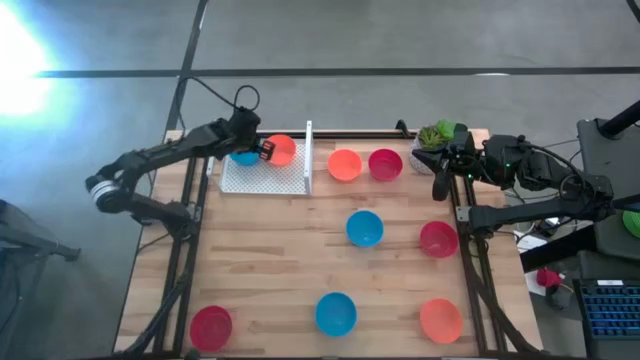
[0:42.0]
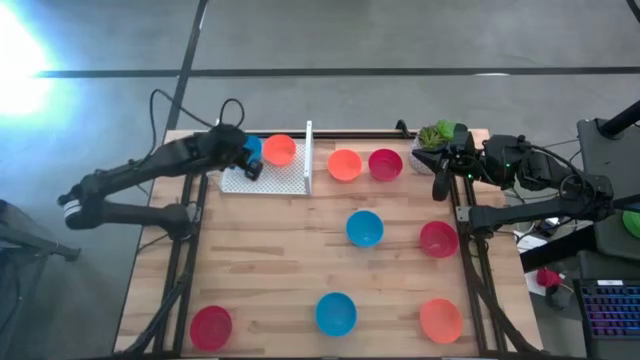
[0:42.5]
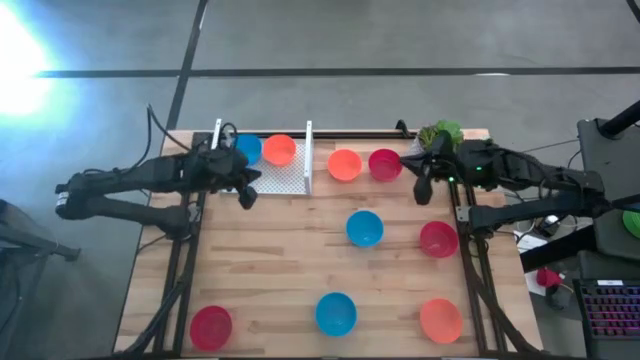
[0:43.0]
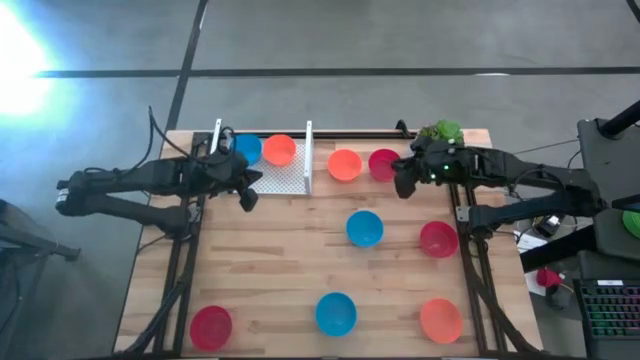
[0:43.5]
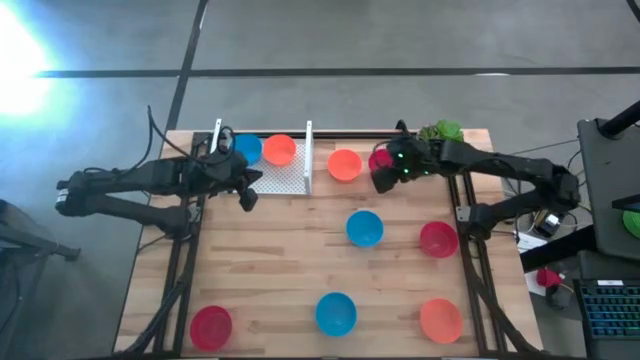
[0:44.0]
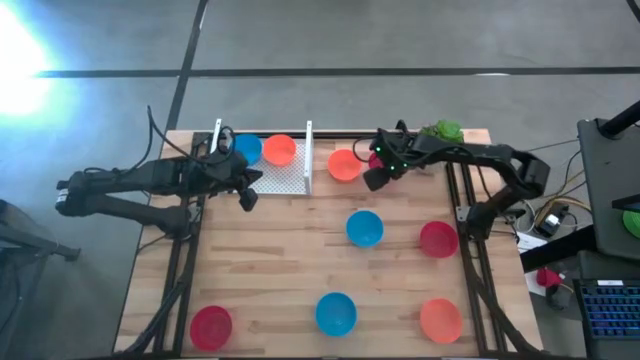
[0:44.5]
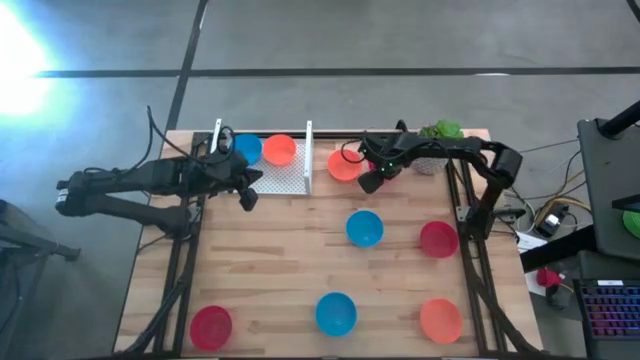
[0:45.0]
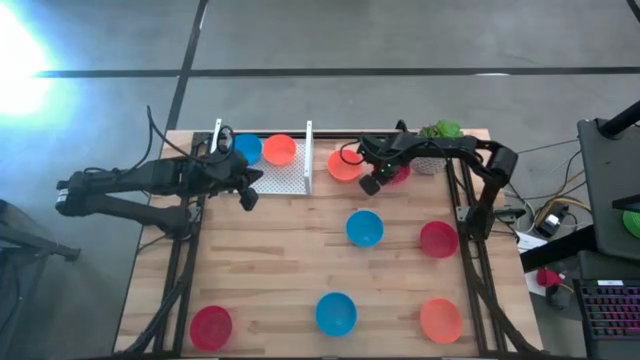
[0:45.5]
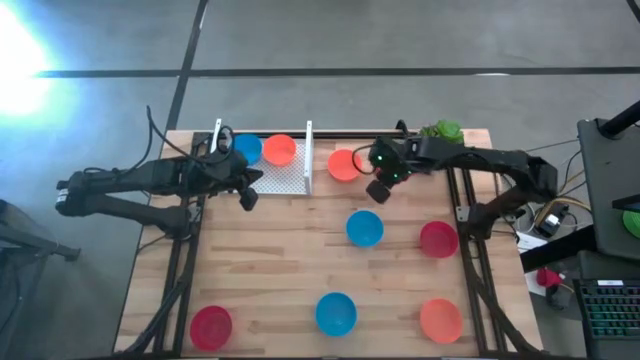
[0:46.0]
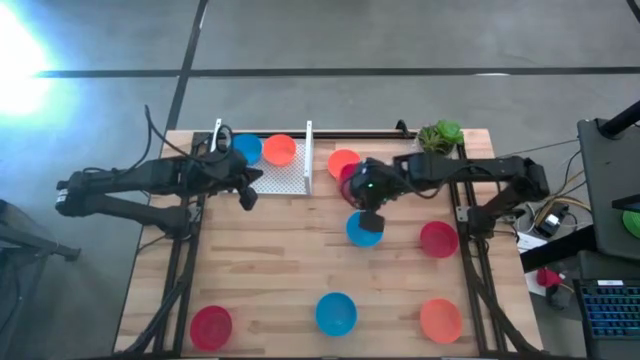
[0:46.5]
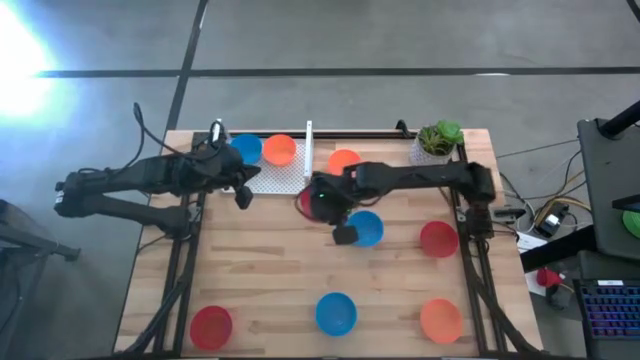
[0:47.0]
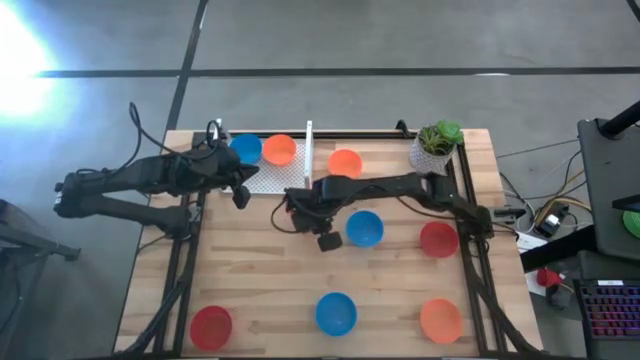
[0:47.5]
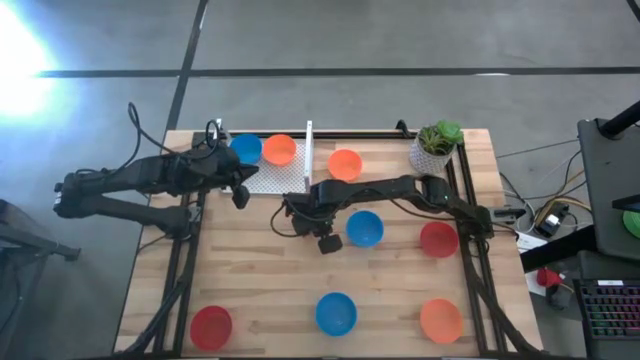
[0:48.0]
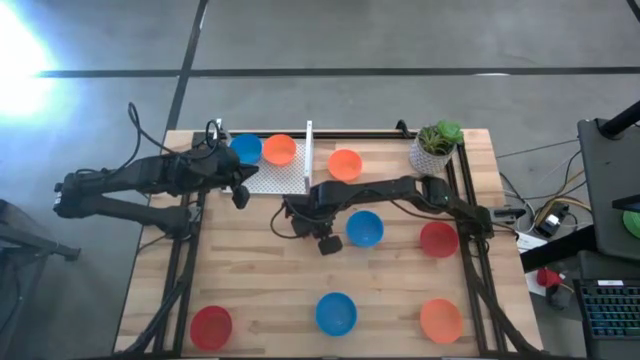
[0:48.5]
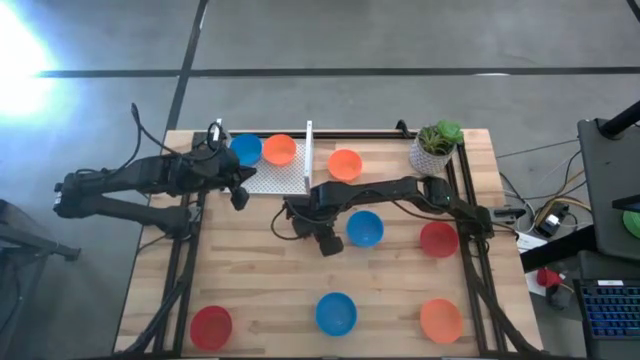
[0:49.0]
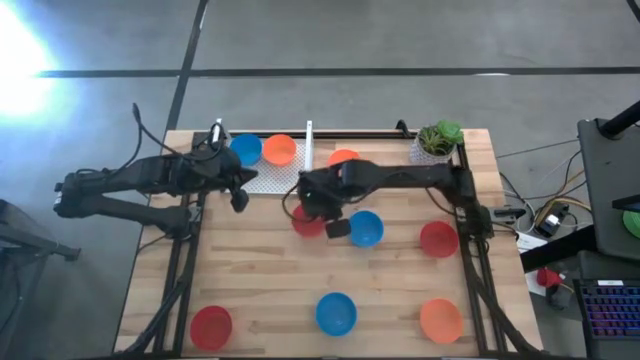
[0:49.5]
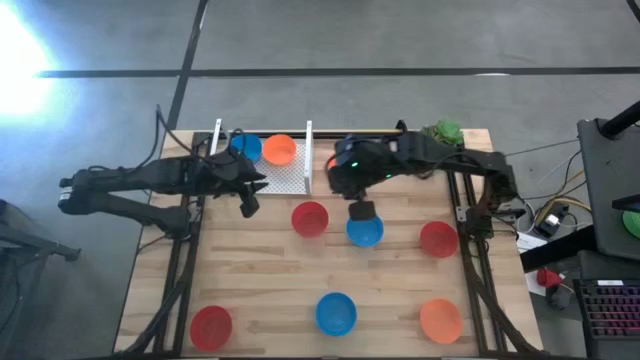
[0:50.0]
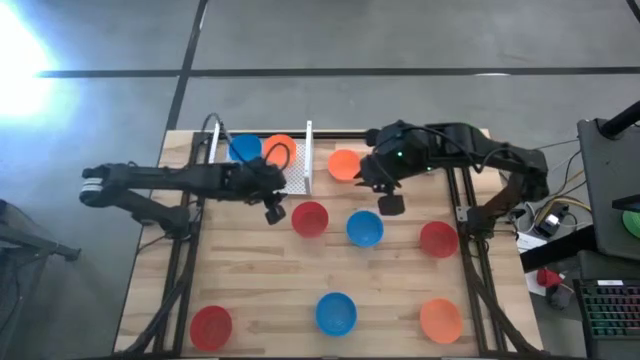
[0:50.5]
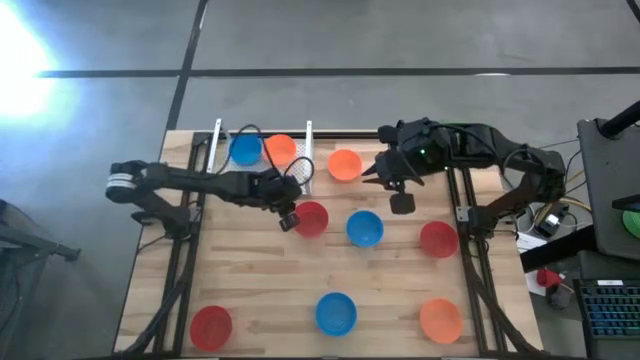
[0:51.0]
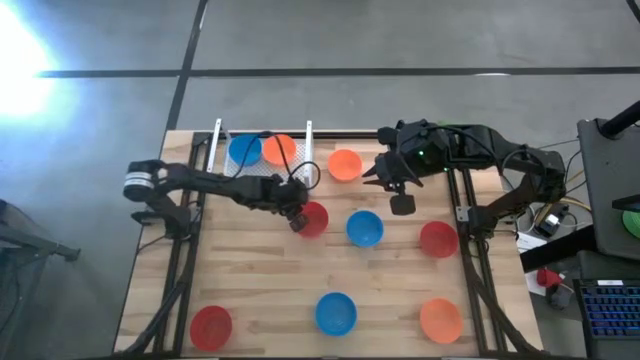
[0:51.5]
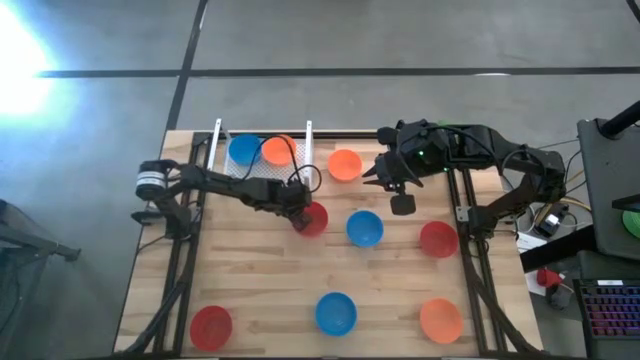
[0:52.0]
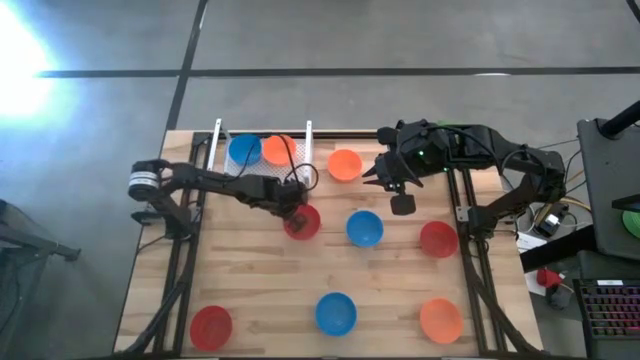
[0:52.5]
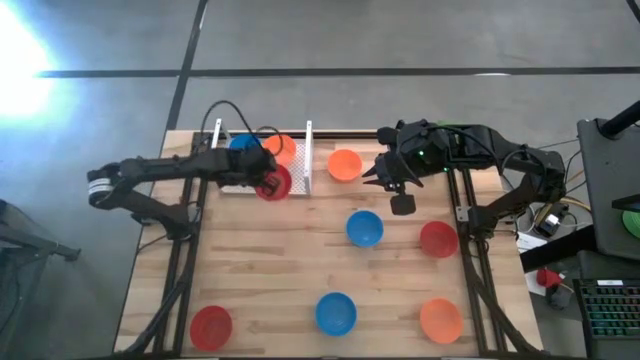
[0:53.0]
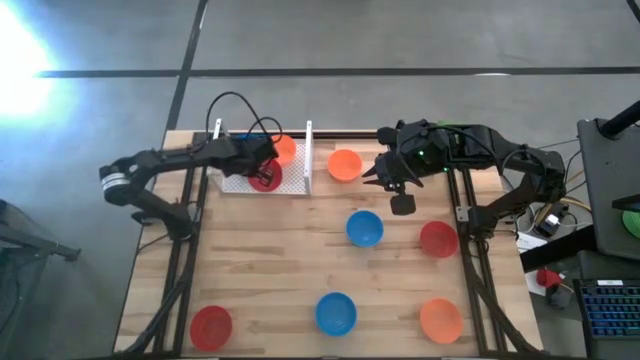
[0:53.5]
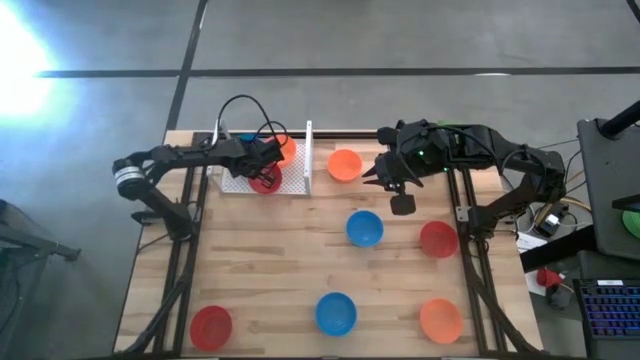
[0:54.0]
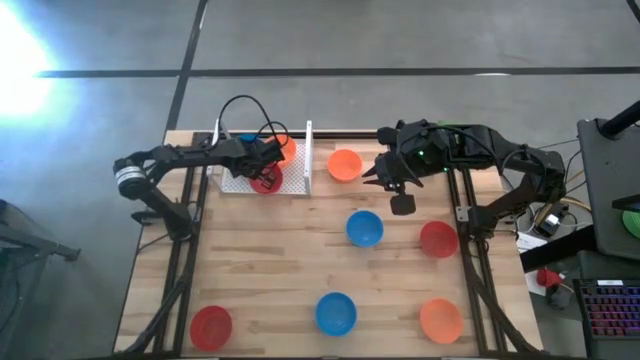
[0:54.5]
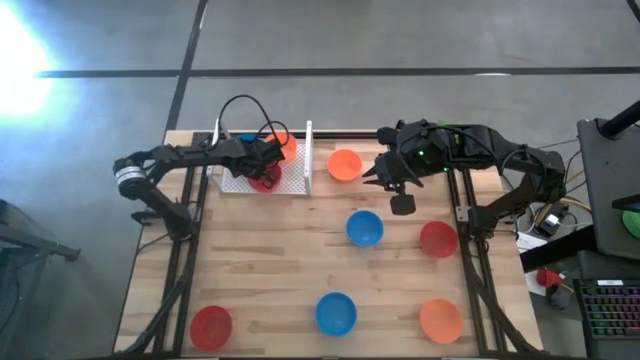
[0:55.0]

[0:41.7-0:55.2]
Task: Pick & Place Mini bowls
Put the top red bowl on the shelf

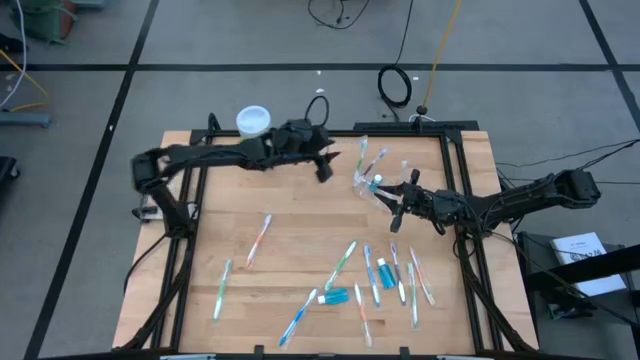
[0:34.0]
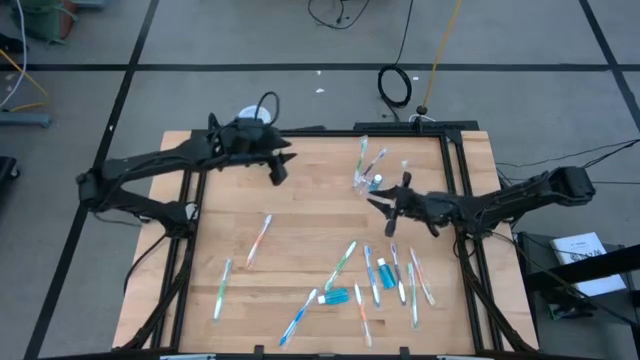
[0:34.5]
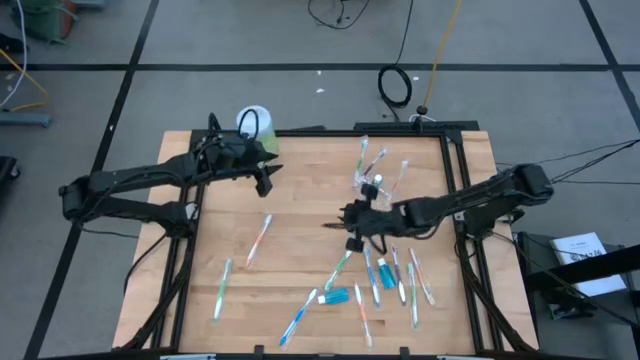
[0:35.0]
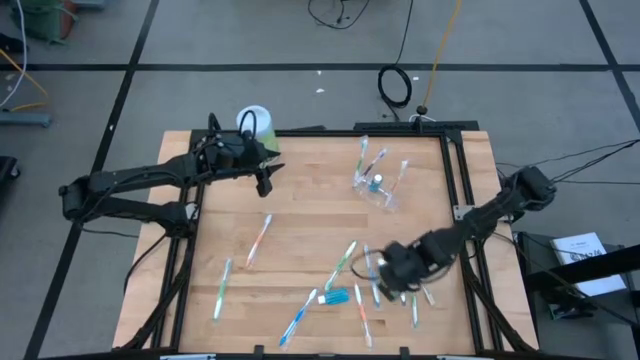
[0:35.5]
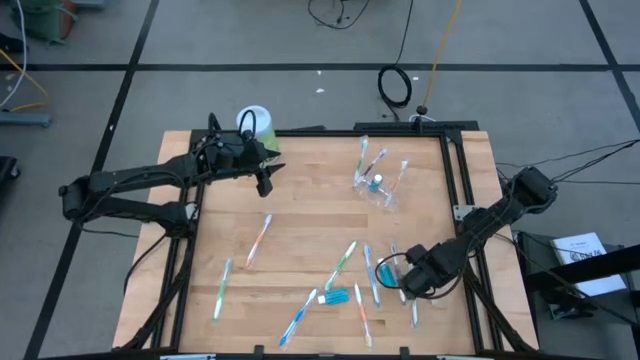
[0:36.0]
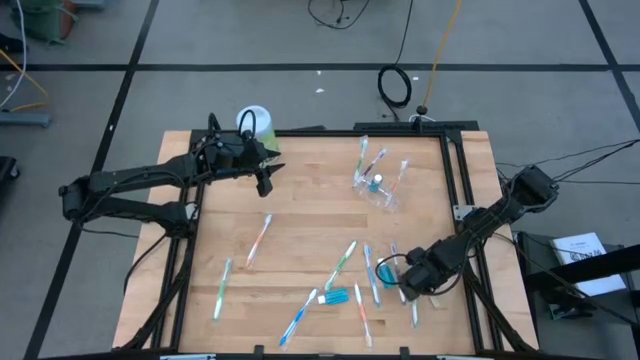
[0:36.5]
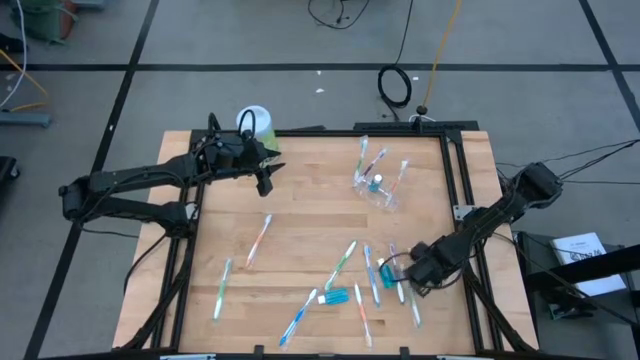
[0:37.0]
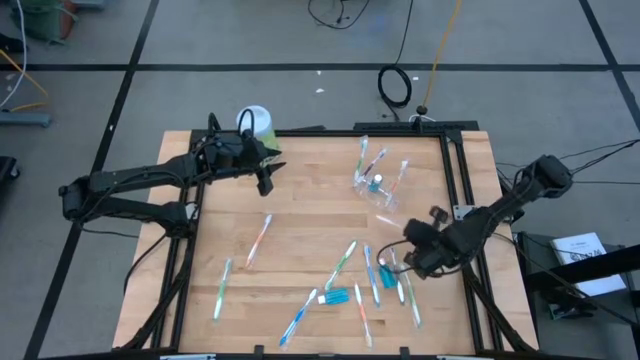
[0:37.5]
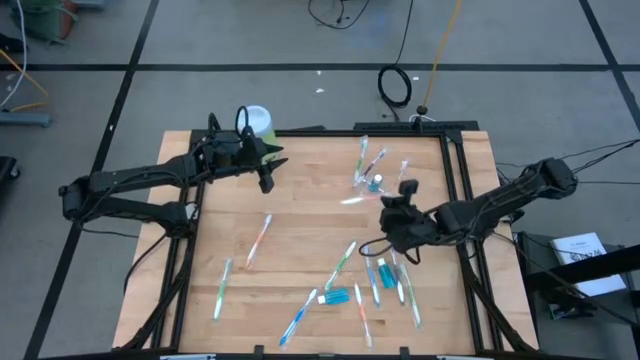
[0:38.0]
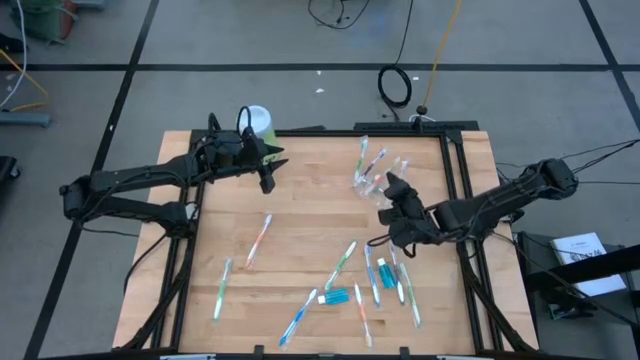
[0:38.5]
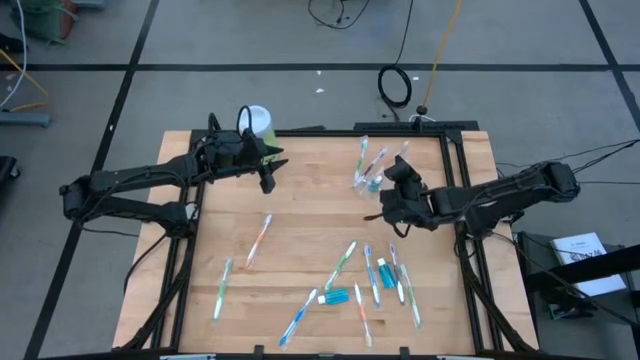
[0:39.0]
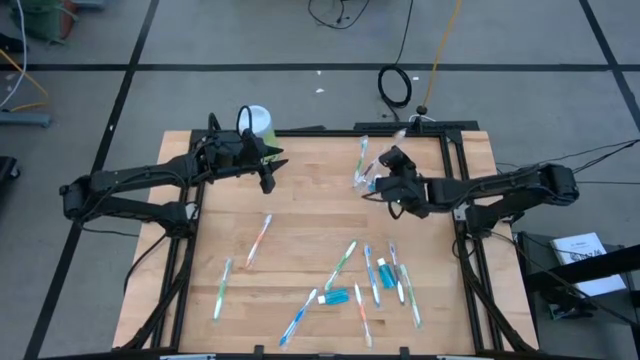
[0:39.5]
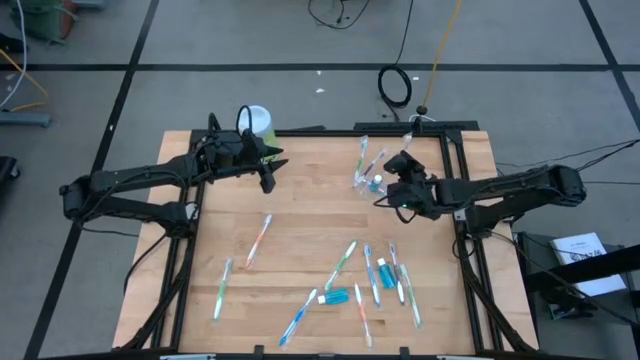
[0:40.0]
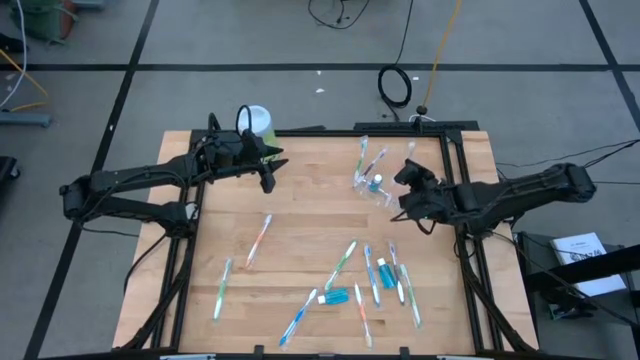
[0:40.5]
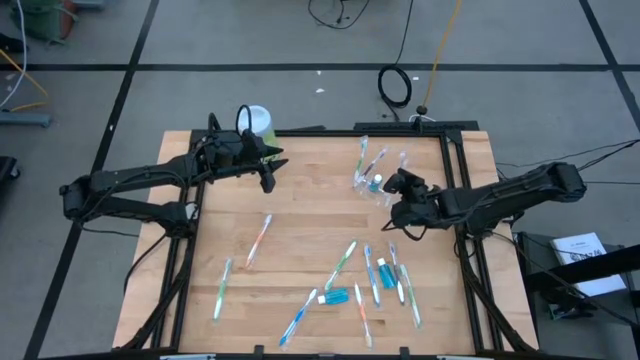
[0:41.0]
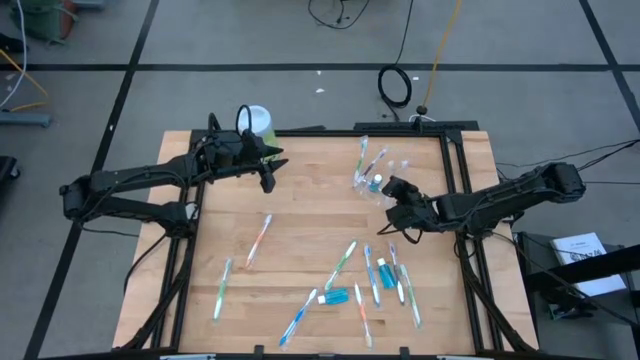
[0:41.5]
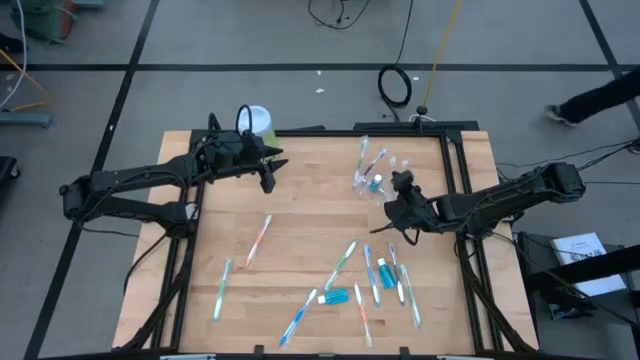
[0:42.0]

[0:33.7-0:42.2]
Task: Pick & Place toothbrushing station
Put the orange toothbrush into the transparent organizer
